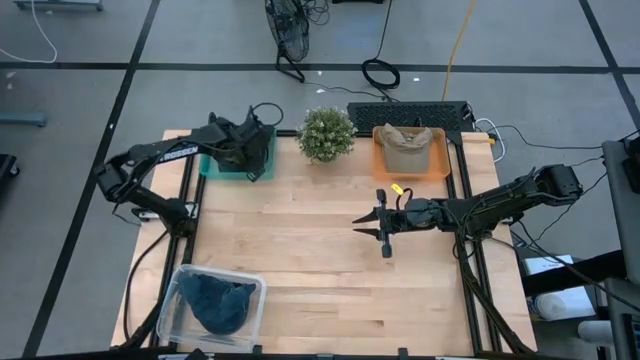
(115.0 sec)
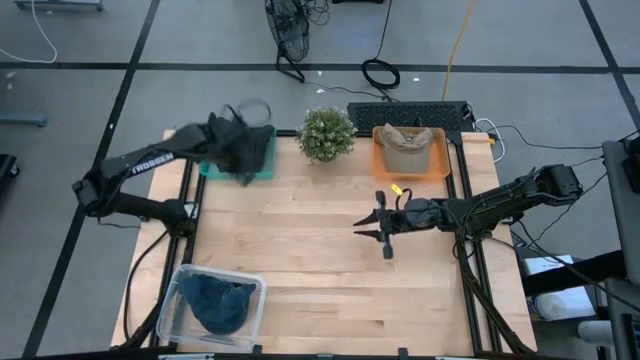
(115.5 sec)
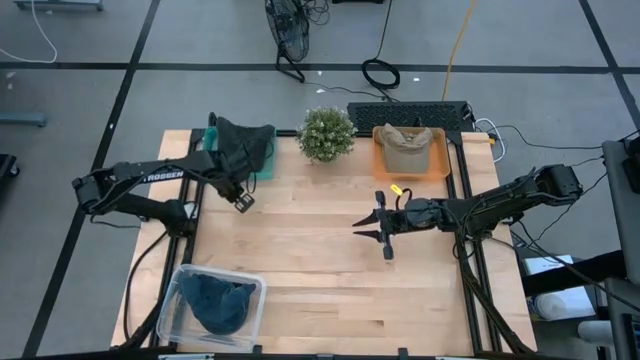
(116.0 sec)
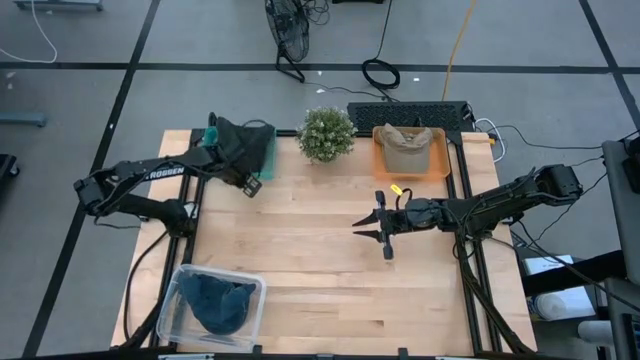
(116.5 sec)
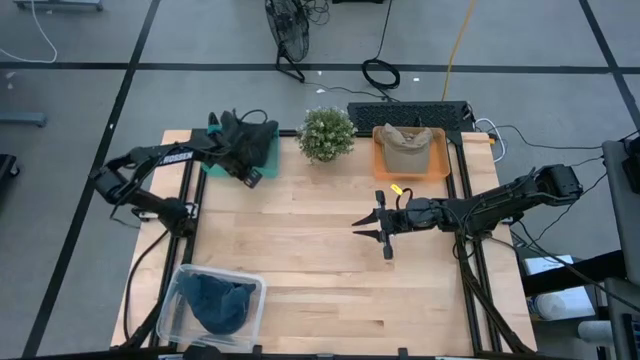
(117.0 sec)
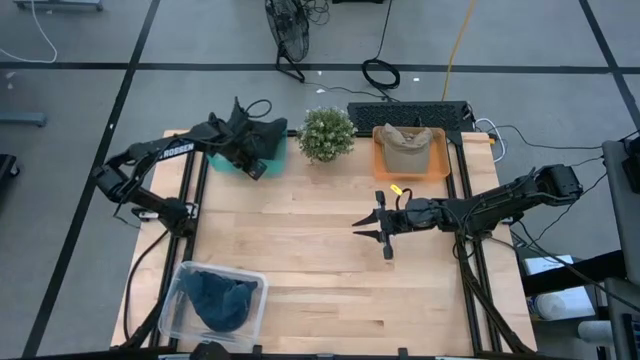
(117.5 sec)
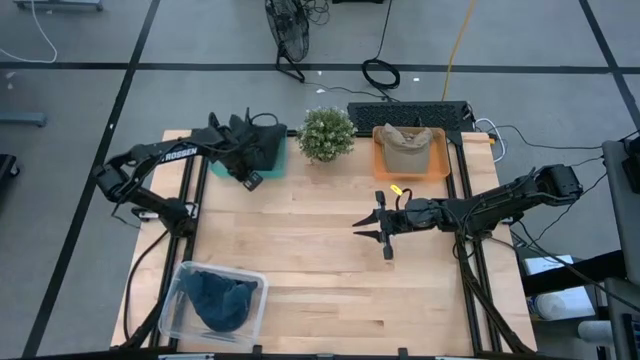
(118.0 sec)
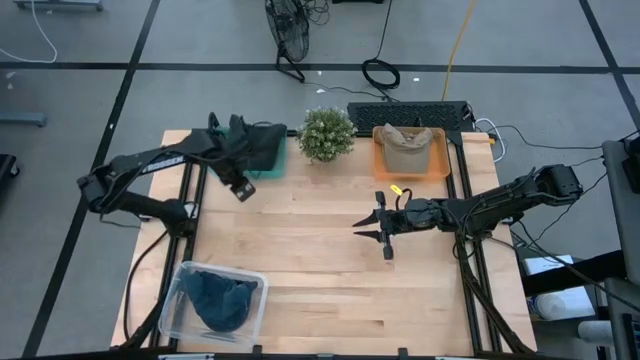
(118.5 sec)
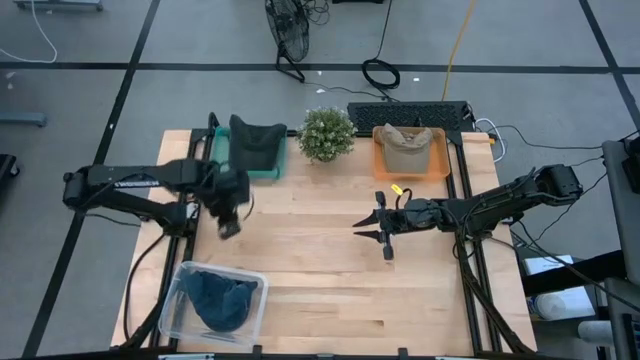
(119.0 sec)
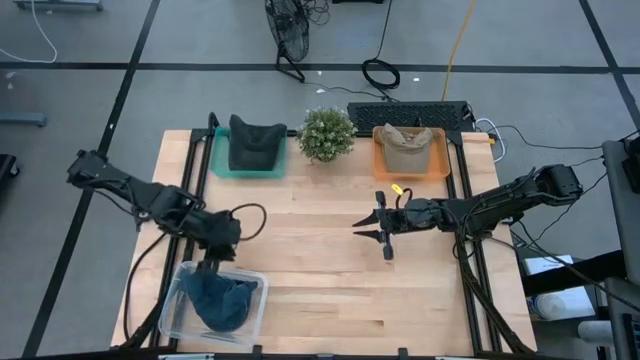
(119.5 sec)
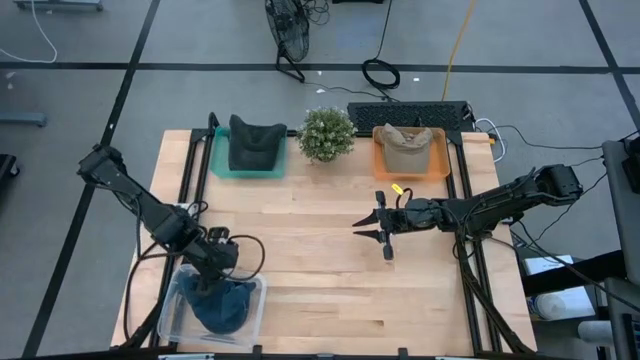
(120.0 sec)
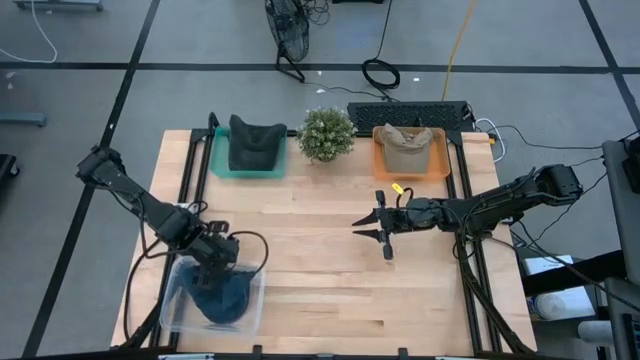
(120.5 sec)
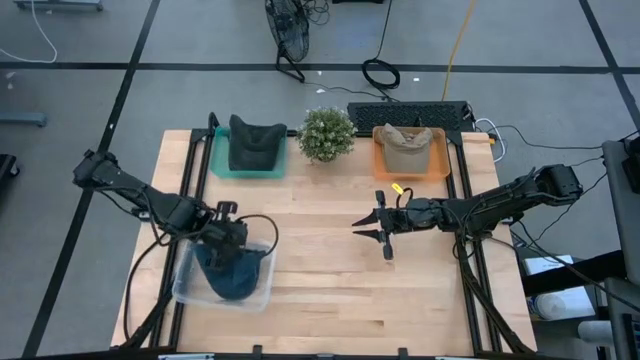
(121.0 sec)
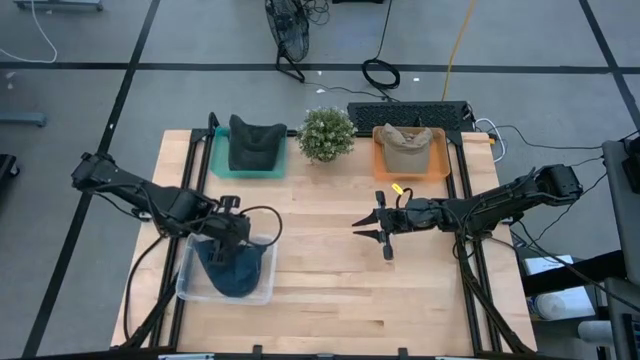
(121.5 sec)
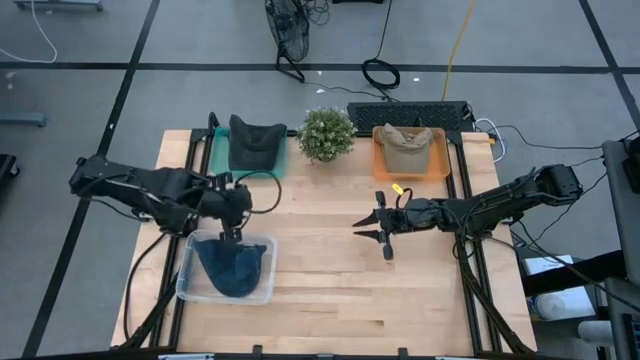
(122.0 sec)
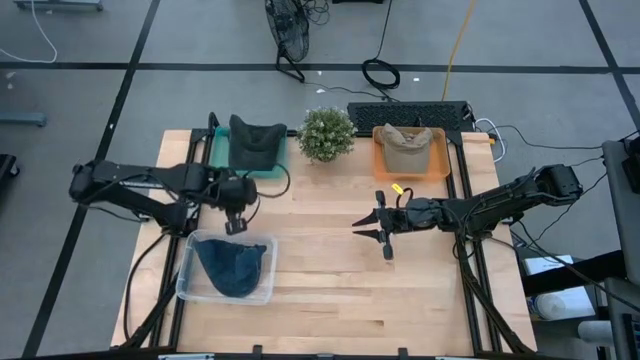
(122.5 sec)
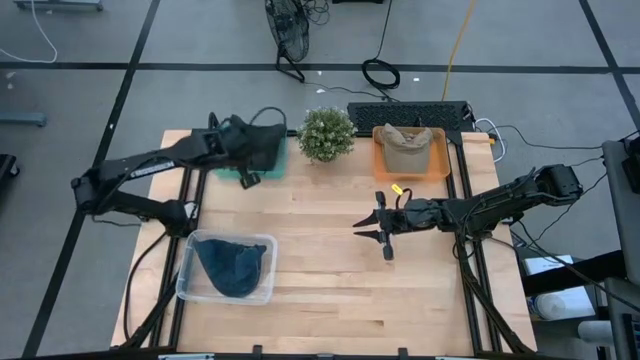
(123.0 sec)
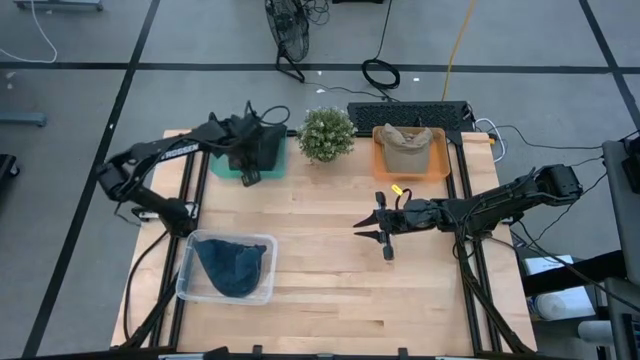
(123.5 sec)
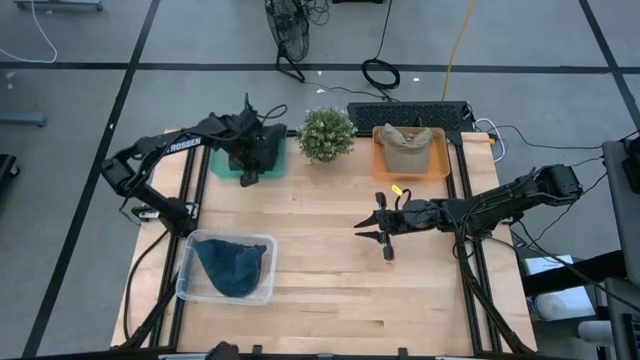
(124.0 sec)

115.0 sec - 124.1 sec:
Task: Pick & Place hat
Adjust the bins

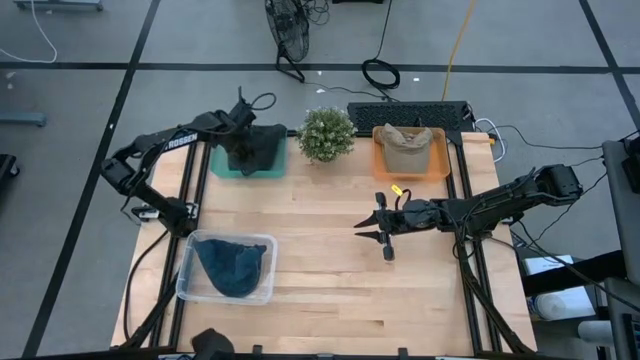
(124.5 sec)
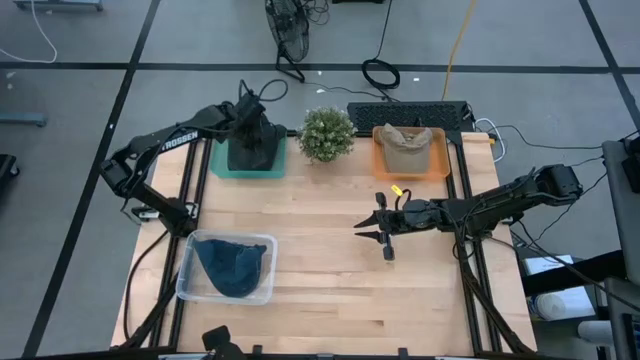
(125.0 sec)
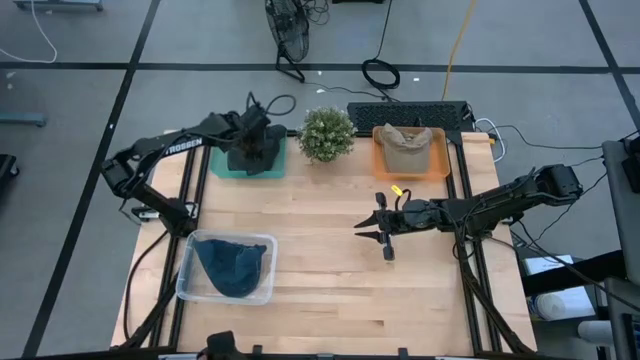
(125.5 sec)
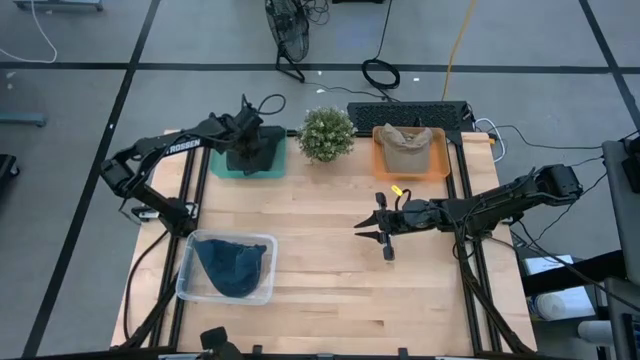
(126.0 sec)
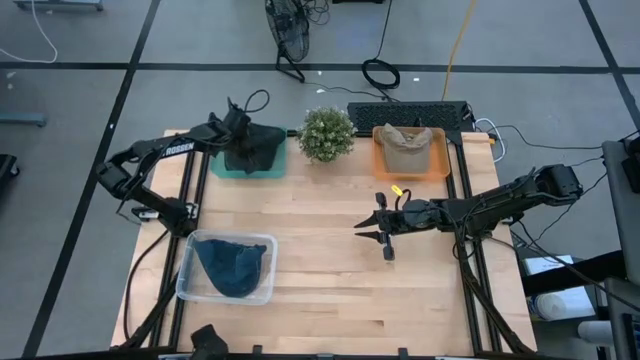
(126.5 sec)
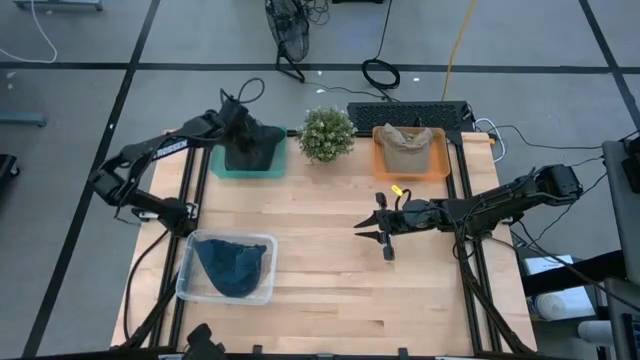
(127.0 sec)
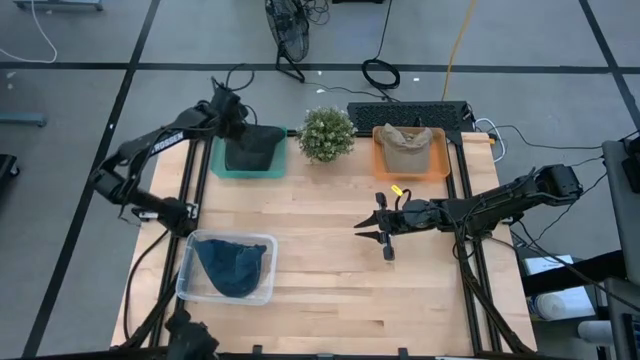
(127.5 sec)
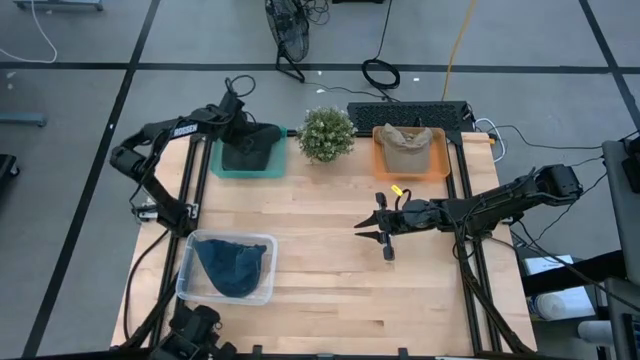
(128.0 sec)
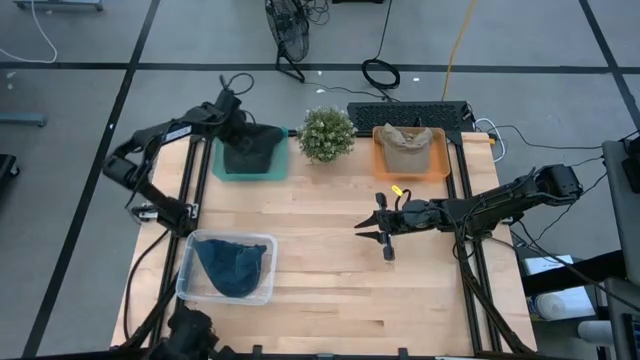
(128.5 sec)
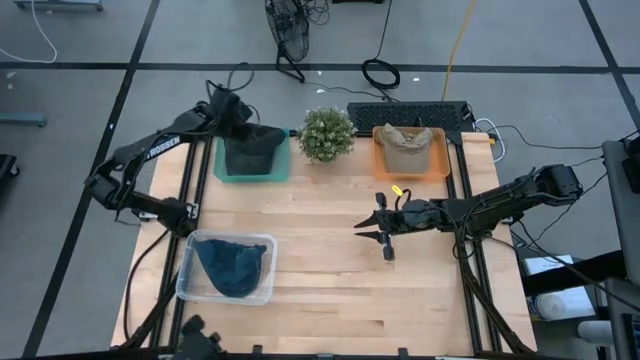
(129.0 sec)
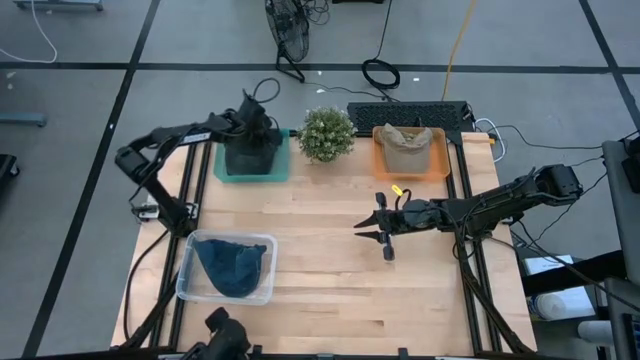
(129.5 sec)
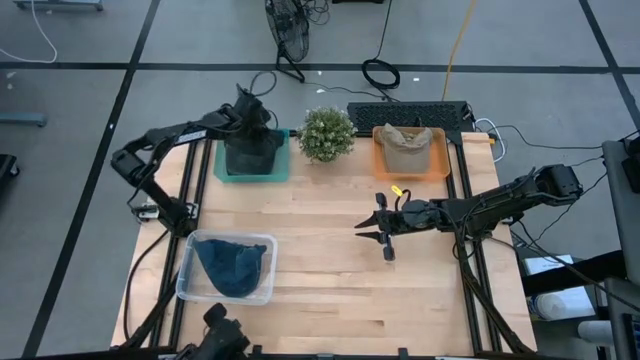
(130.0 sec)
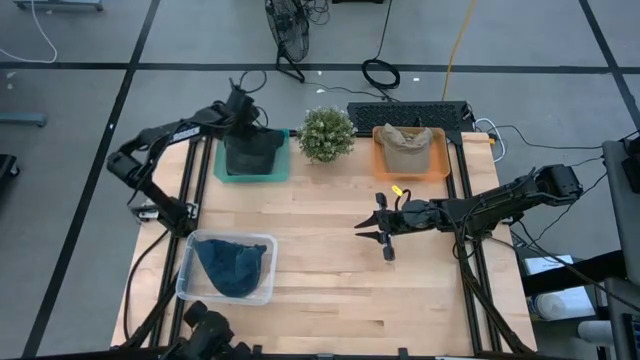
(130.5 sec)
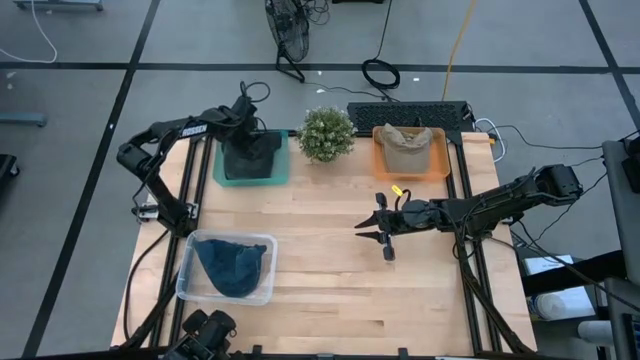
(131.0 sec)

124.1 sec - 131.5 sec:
Adjust the black cap in the green bin

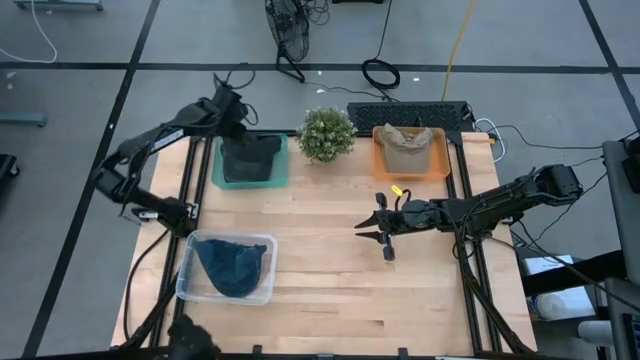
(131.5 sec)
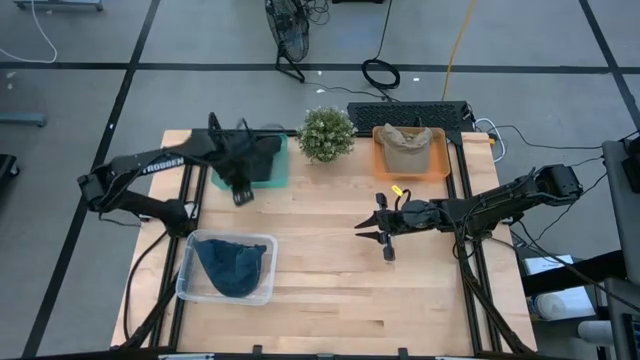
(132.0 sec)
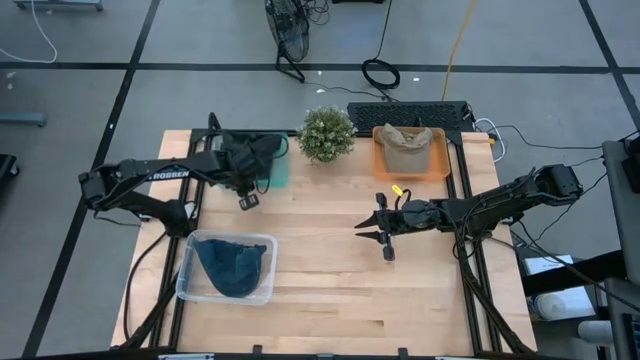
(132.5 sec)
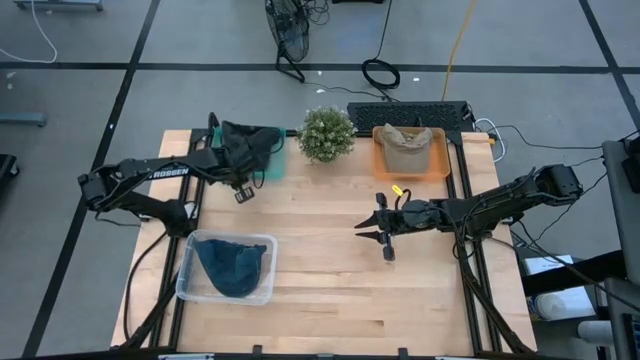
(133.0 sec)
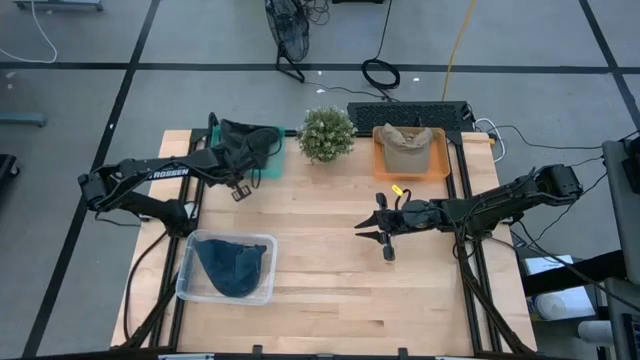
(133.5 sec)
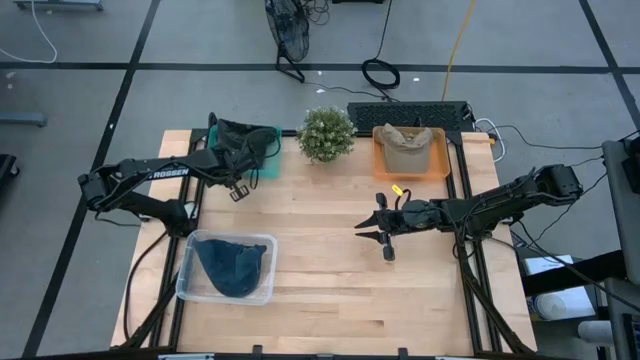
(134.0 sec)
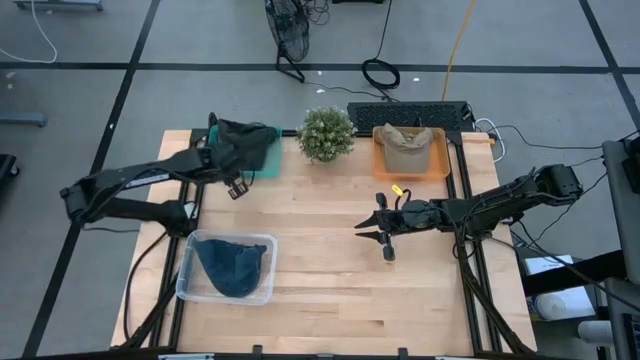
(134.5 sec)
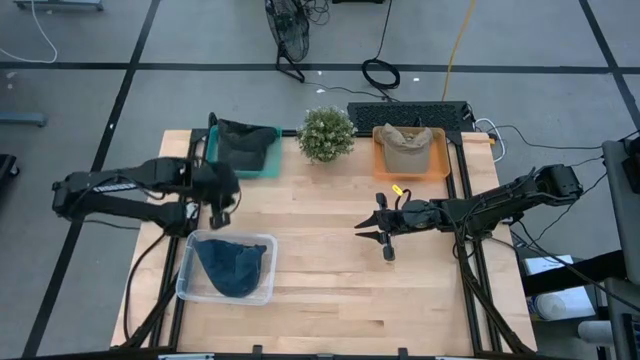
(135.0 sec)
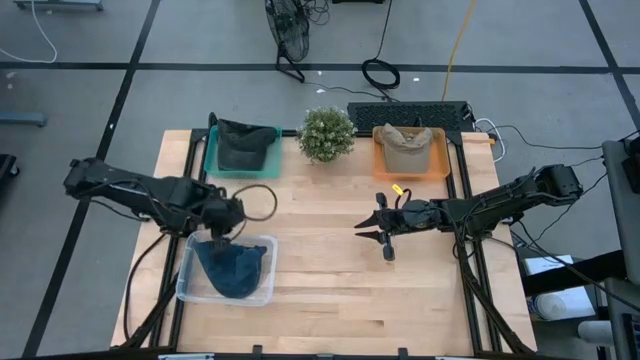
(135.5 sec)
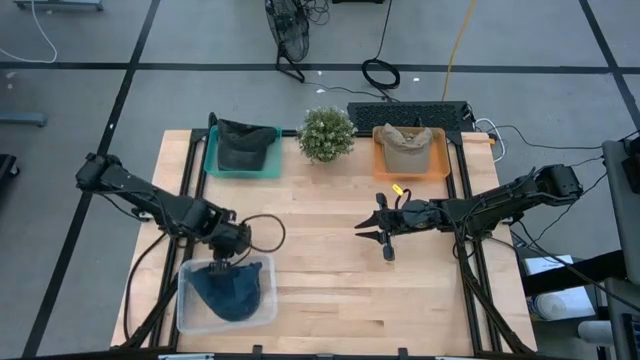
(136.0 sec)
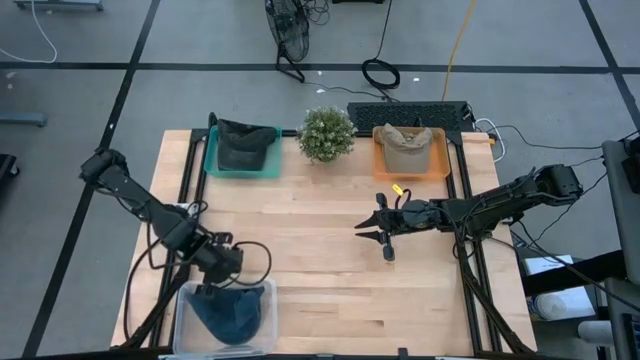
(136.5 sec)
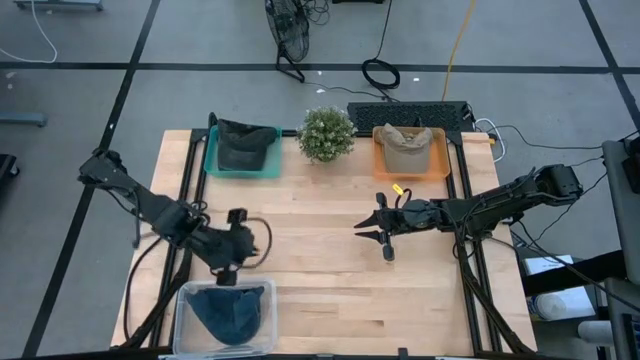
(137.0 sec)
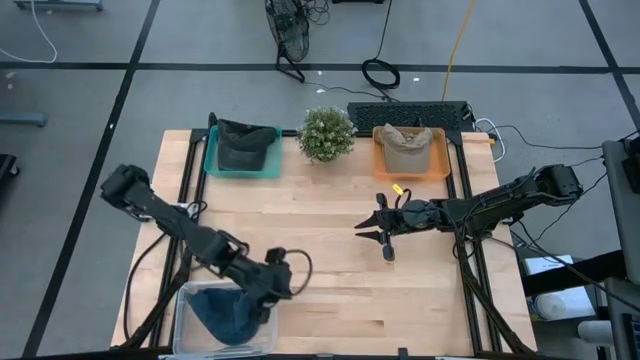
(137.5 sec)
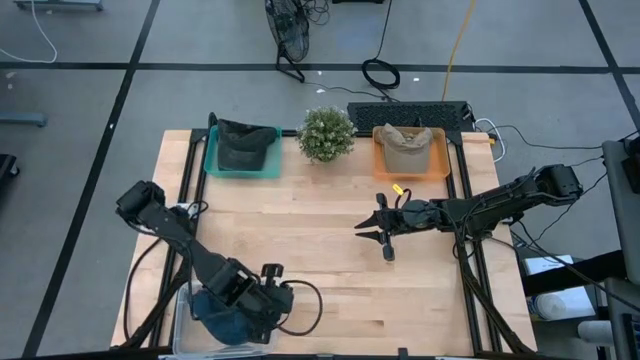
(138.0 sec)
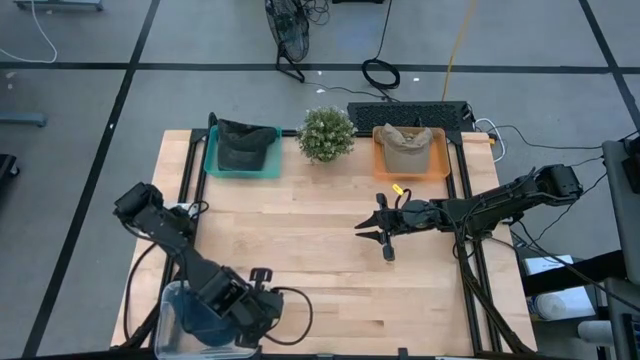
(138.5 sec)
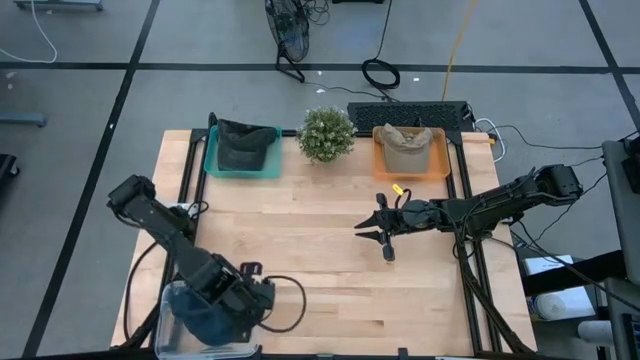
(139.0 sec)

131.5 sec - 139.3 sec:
Adjust the bins
